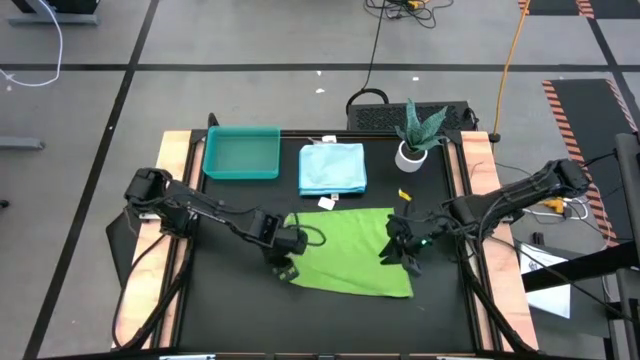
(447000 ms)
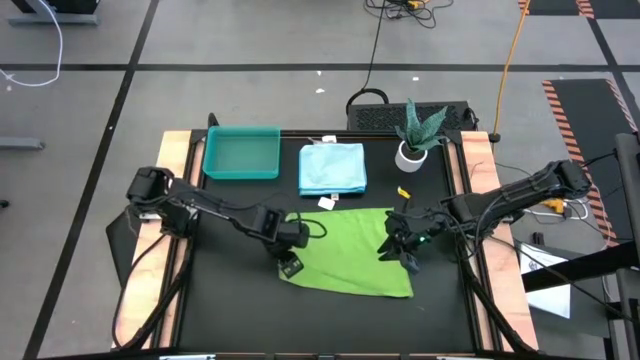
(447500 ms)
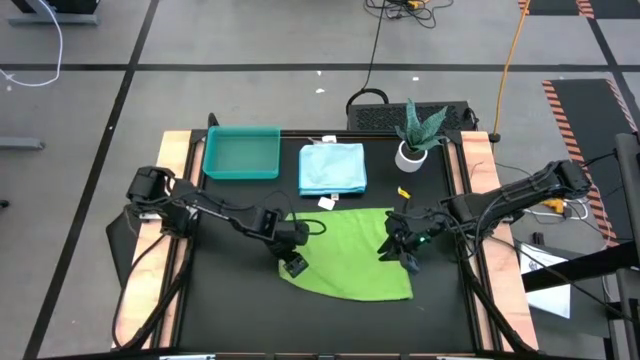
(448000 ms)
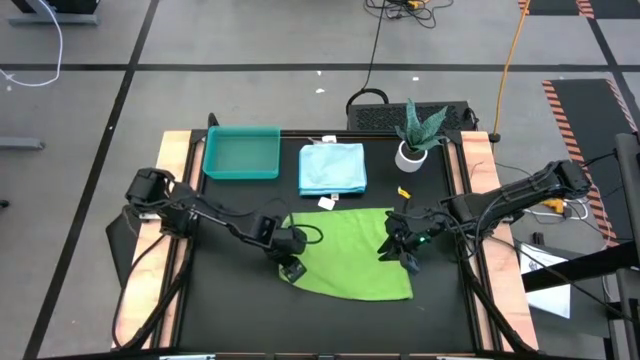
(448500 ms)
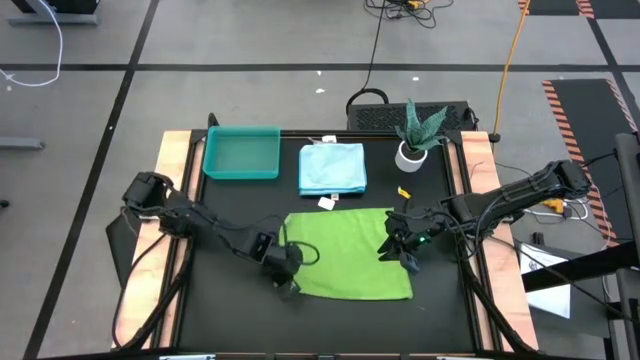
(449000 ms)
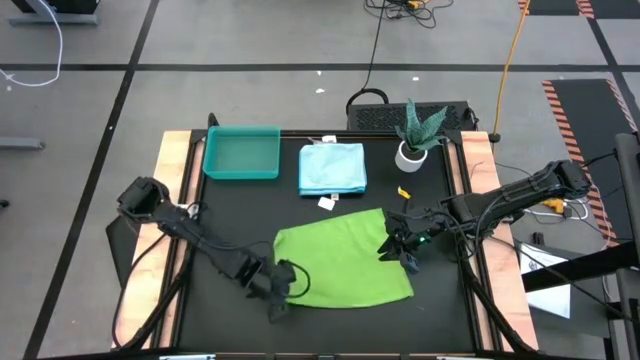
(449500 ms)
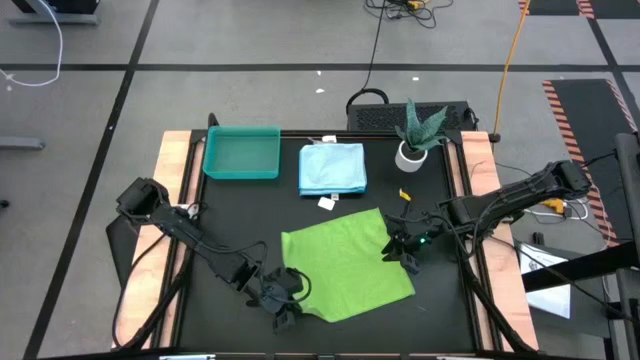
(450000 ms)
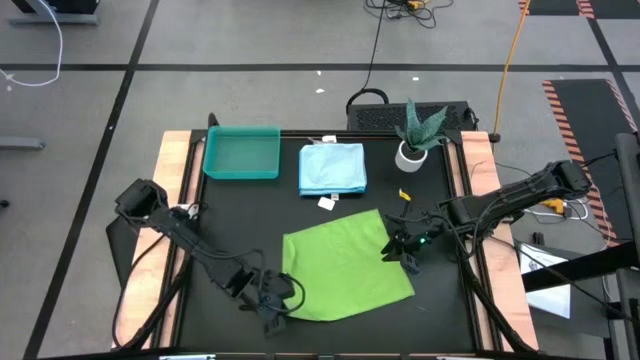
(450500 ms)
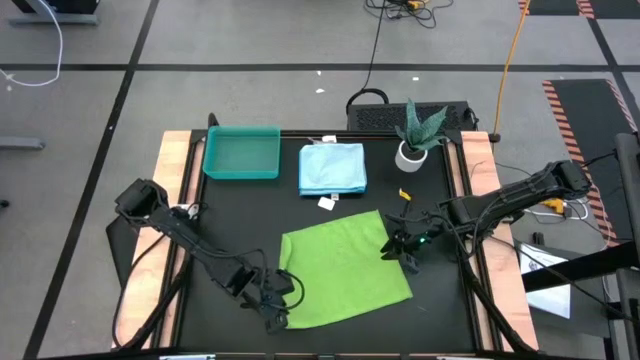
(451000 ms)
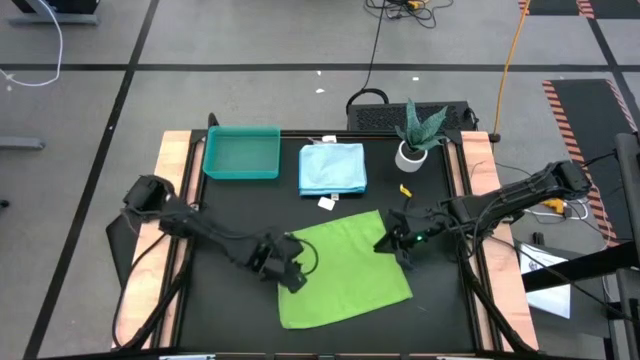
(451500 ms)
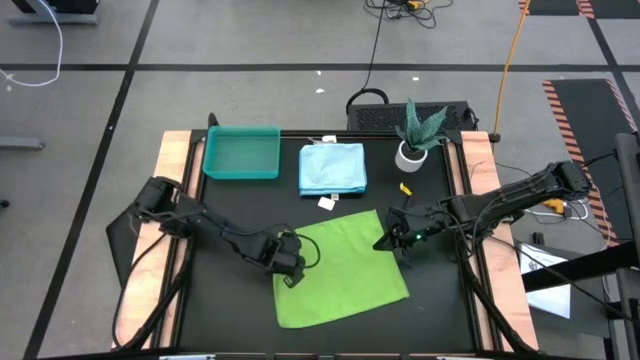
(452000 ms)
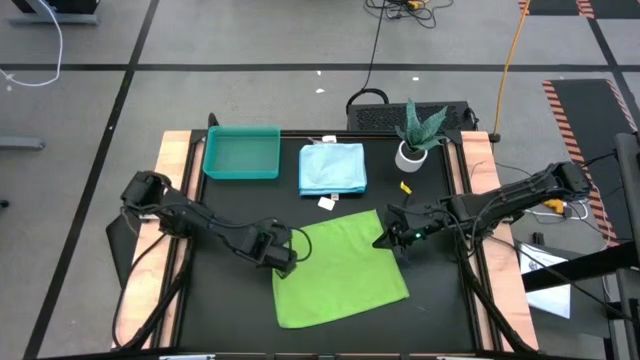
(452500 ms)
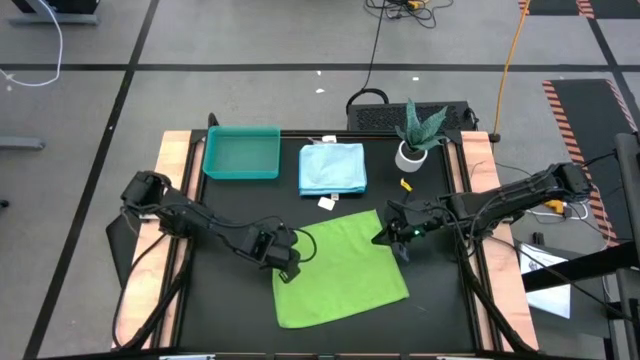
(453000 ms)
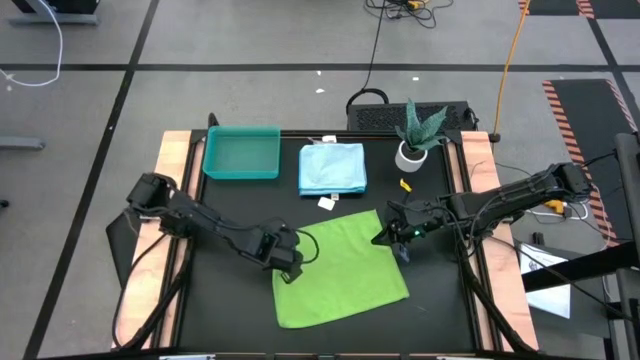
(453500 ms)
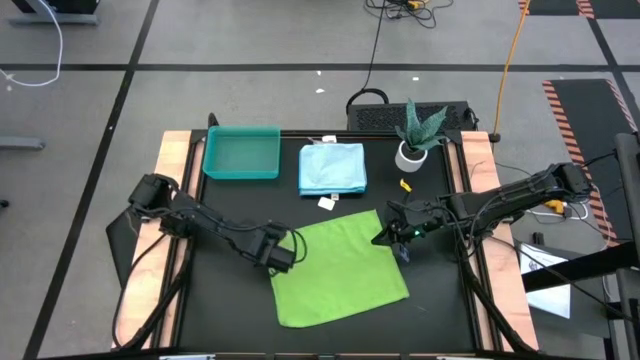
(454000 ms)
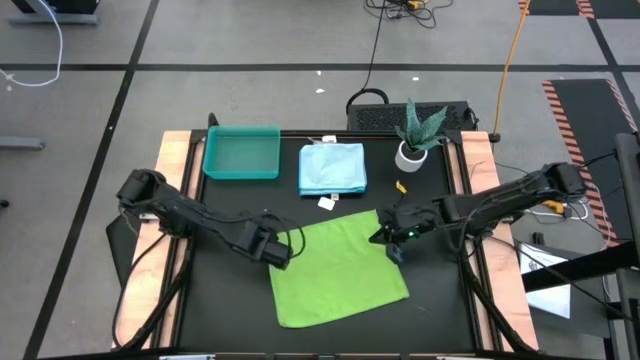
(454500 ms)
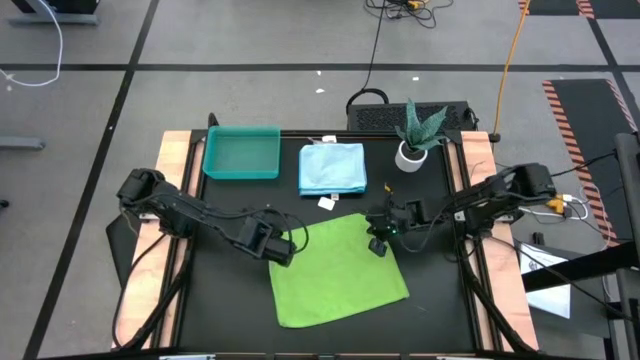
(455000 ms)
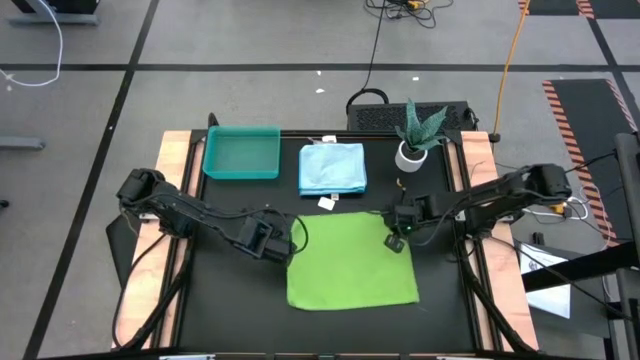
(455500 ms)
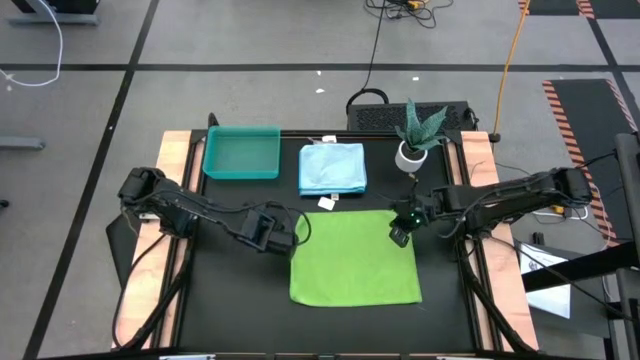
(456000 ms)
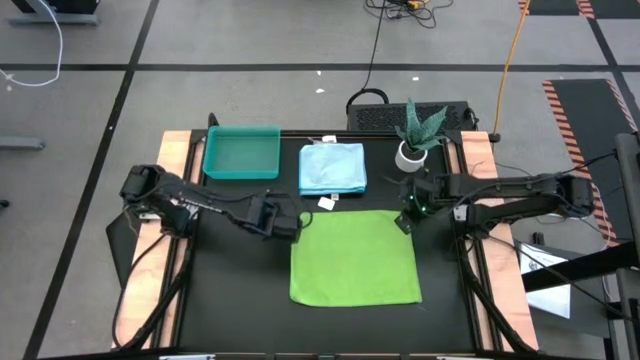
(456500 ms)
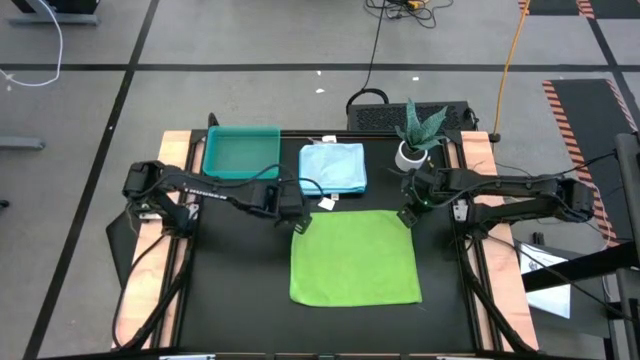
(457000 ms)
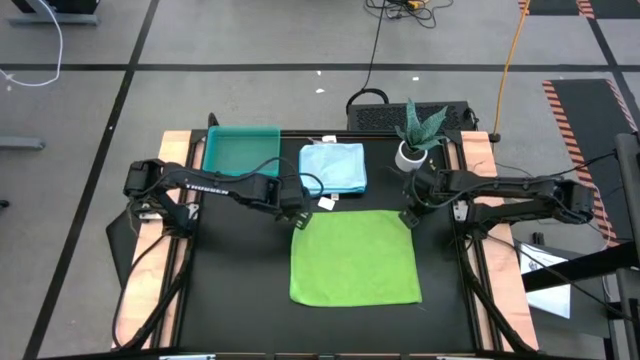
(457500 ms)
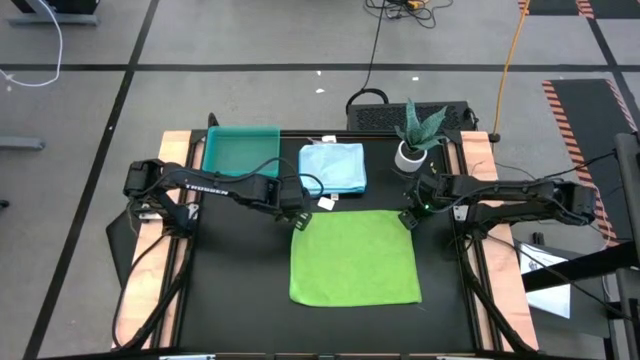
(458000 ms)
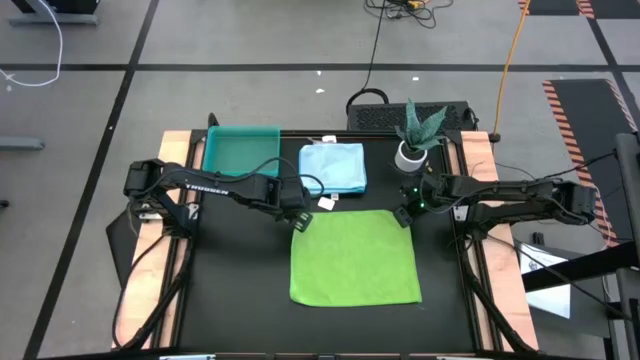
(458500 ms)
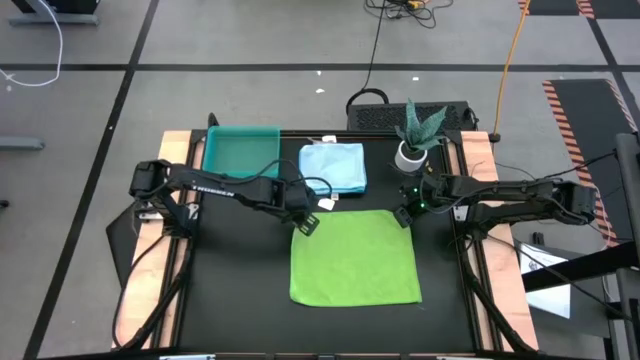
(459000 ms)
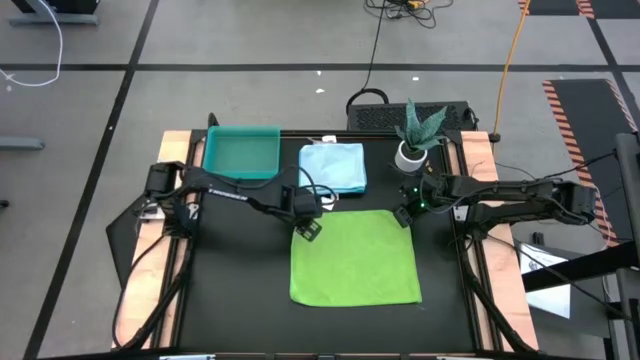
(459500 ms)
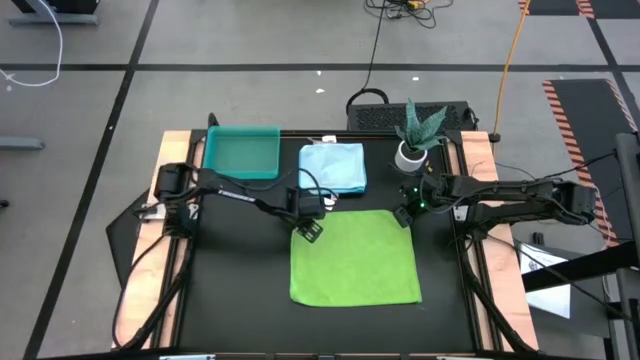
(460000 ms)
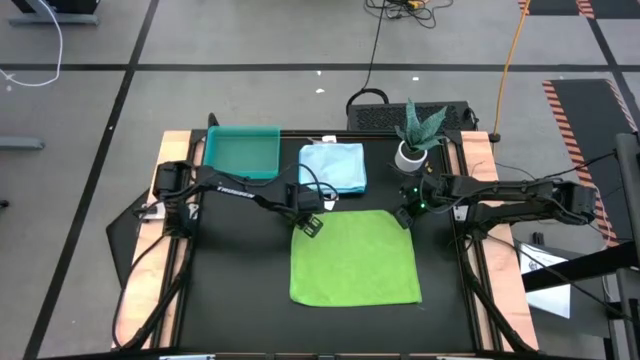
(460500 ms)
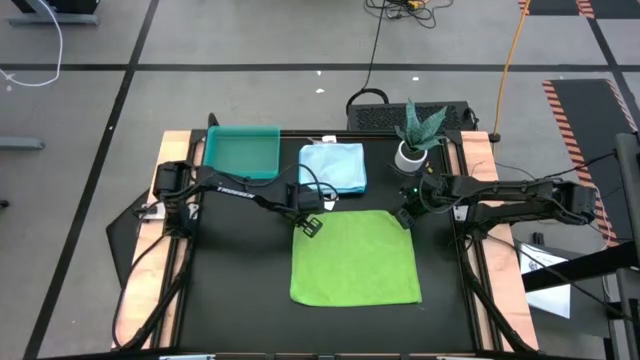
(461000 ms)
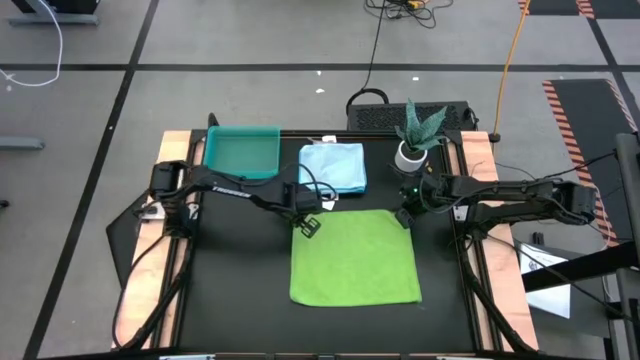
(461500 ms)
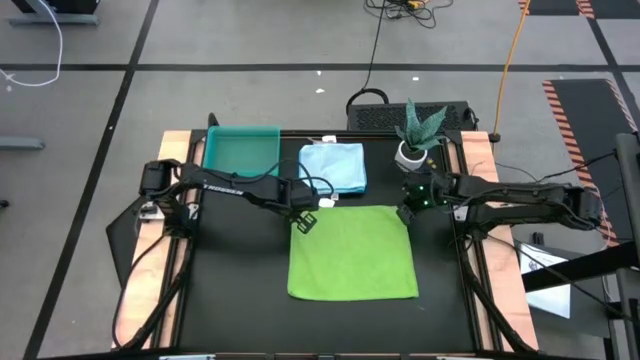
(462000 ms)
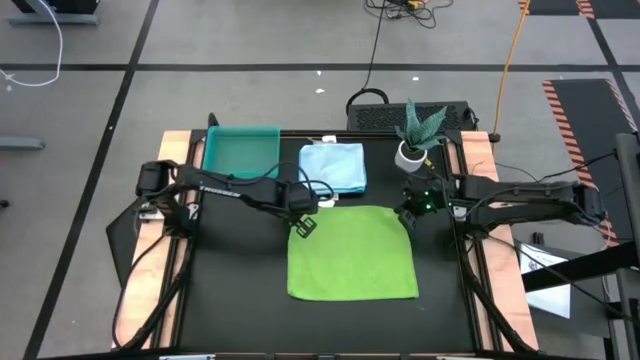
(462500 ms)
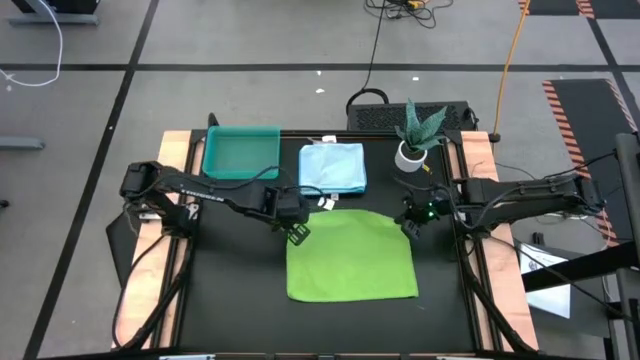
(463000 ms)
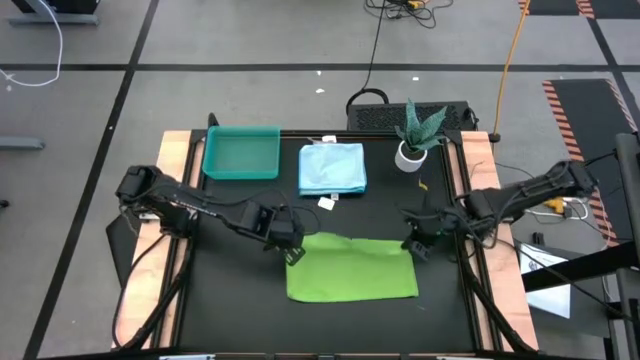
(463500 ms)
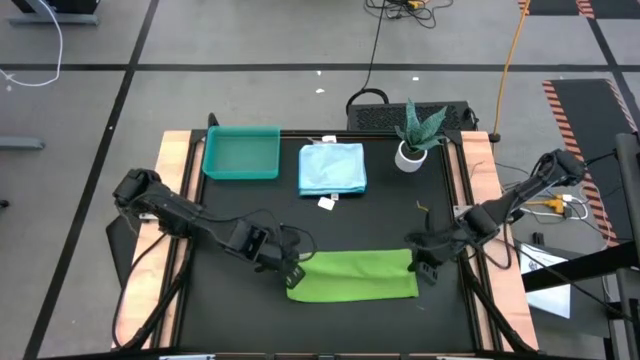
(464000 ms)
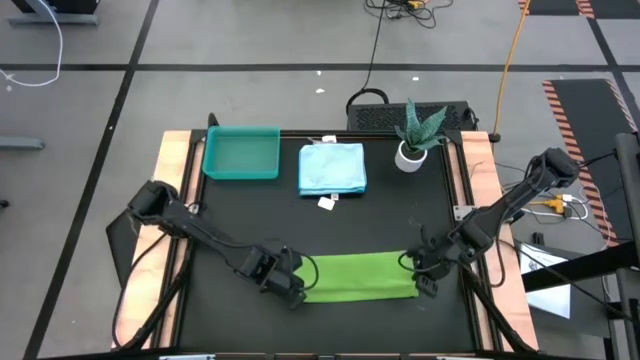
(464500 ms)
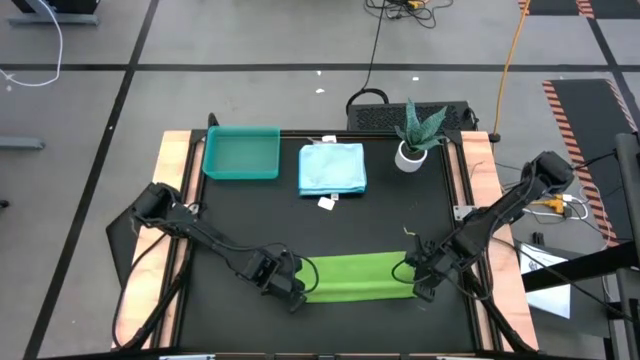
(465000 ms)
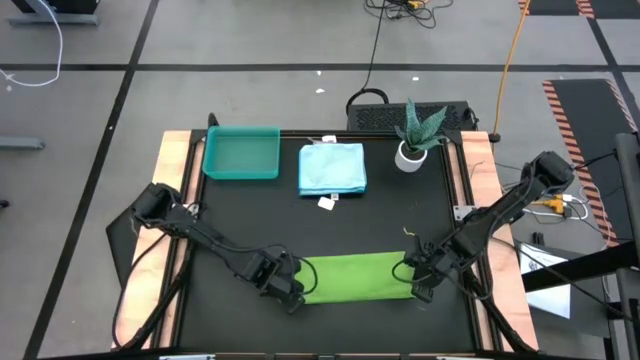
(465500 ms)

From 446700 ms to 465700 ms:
Task: Fold microfiber towels
Fold the green microfiber towel

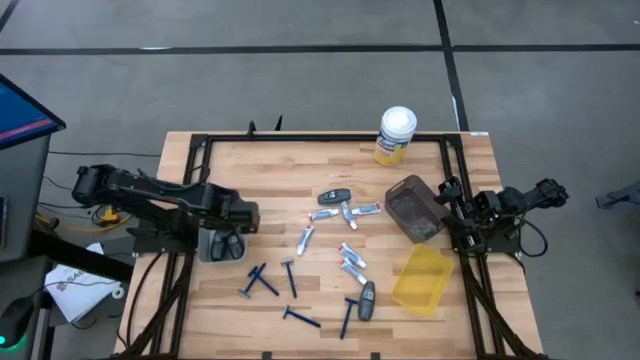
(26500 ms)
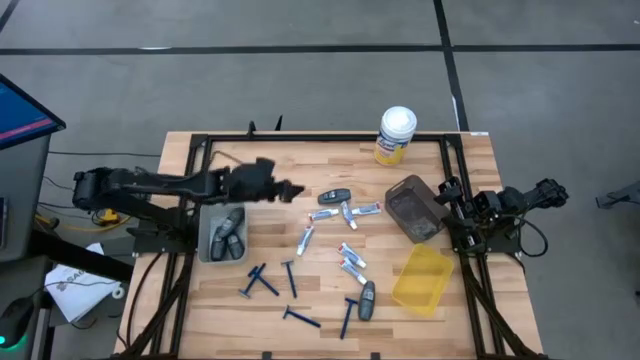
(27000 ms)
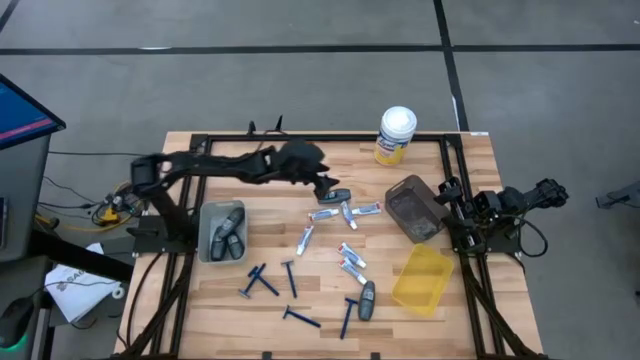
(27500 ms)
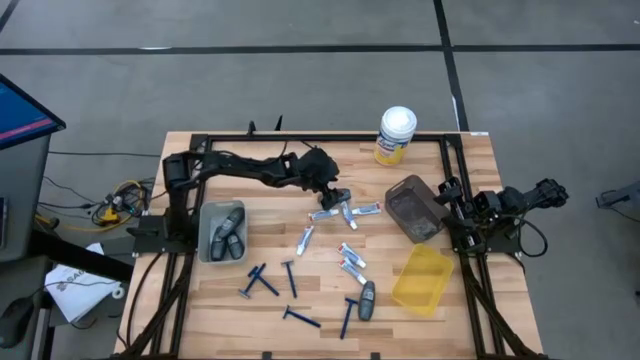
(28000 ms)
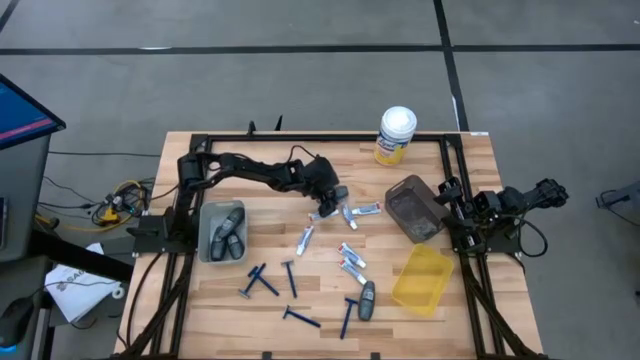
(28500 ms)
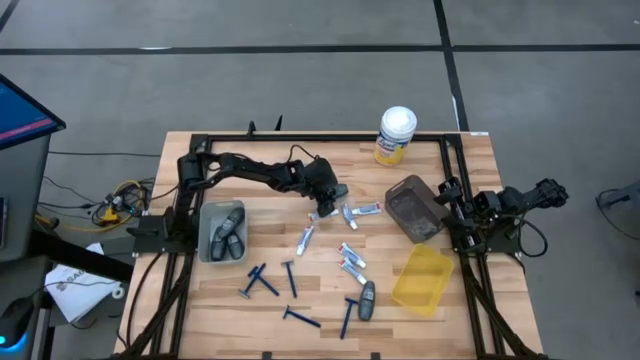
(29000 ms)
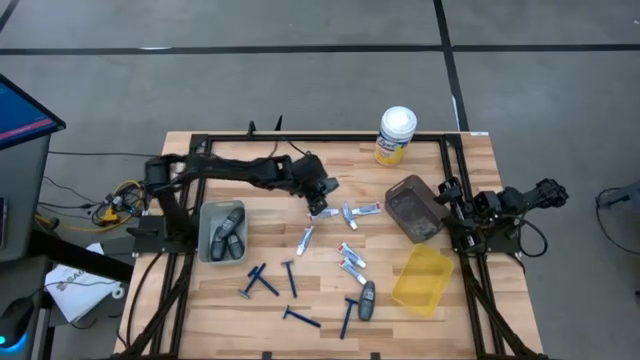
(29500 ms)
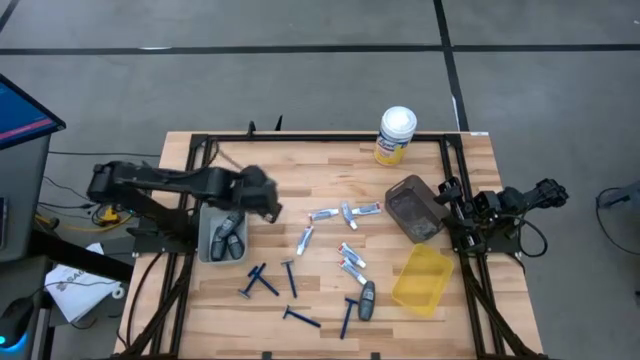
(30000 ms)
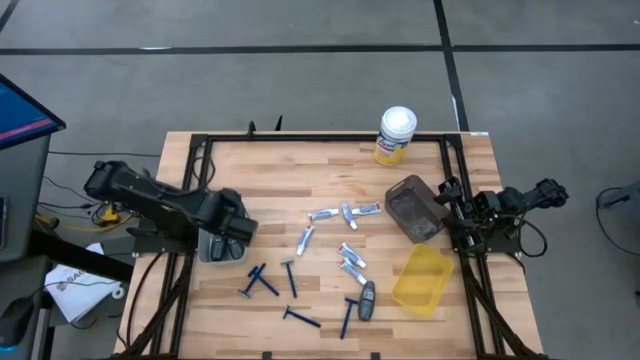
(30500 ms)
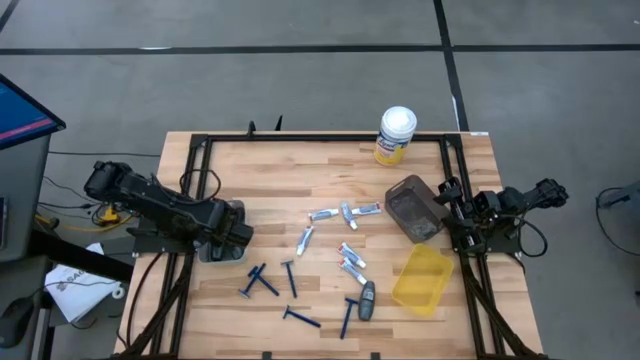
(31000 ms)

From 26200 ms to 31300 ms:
Task: Pick & Place Travel size toiletries
Put the gray deodorant into the gray bin
